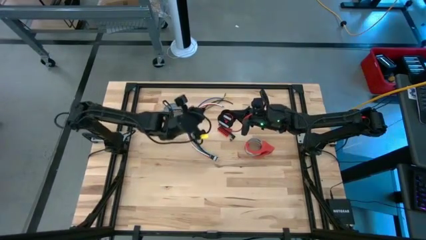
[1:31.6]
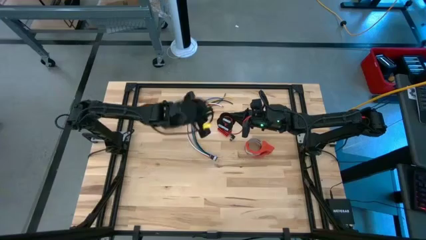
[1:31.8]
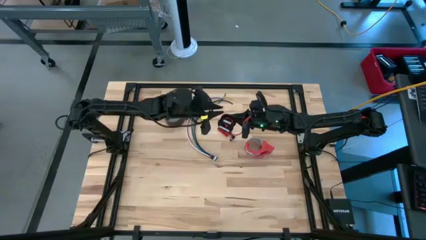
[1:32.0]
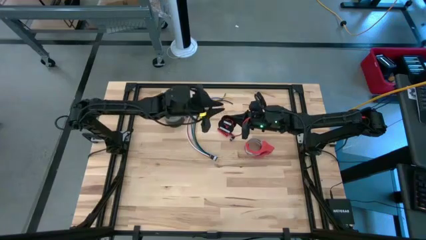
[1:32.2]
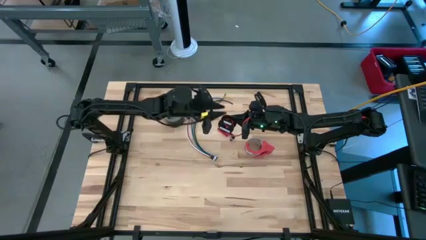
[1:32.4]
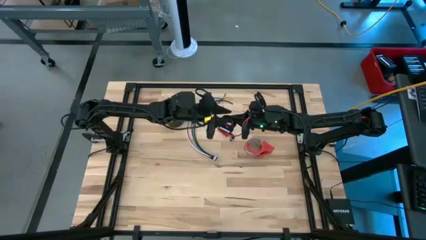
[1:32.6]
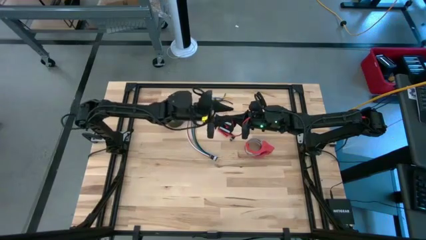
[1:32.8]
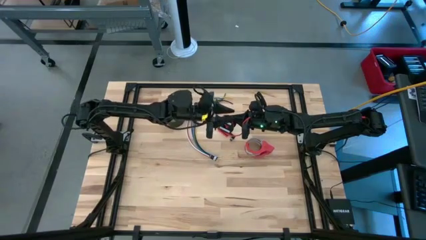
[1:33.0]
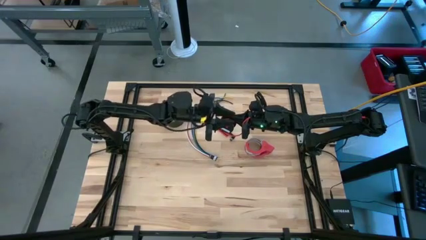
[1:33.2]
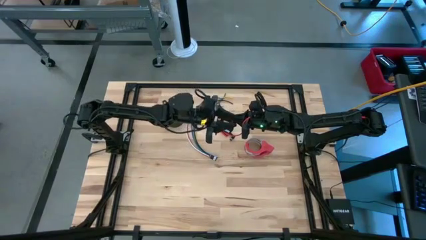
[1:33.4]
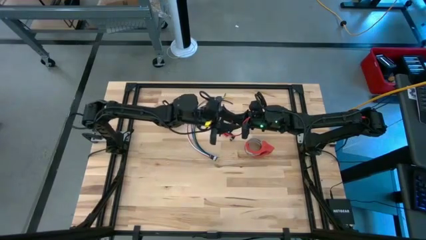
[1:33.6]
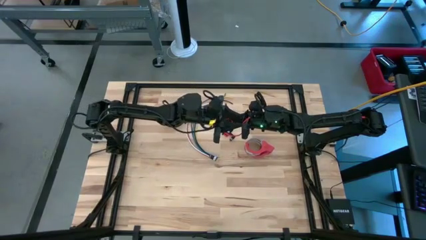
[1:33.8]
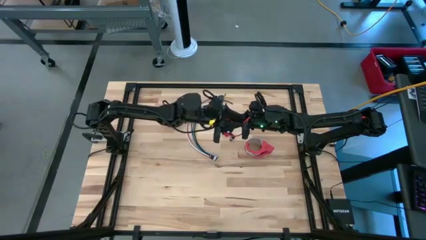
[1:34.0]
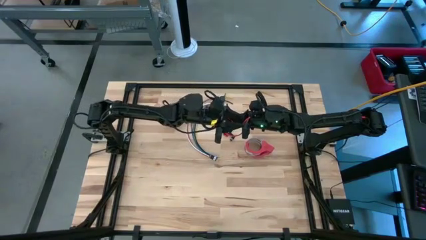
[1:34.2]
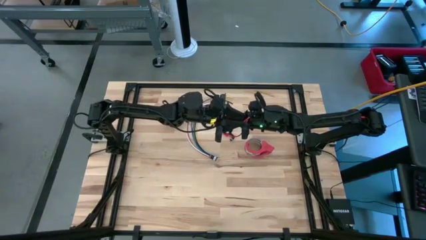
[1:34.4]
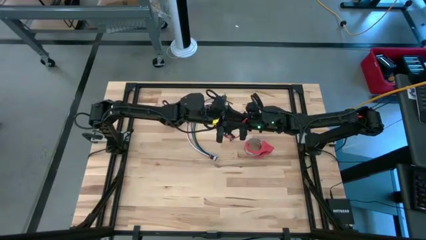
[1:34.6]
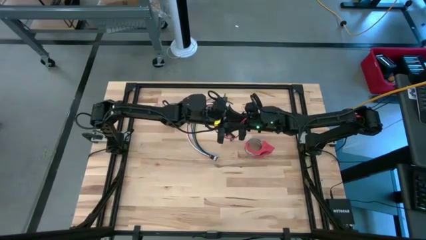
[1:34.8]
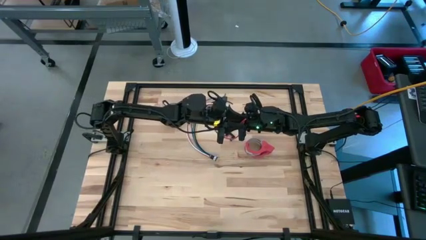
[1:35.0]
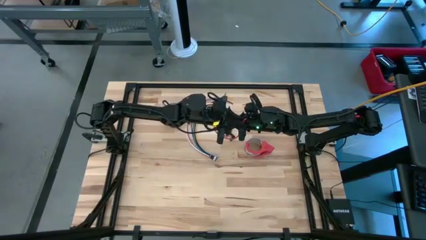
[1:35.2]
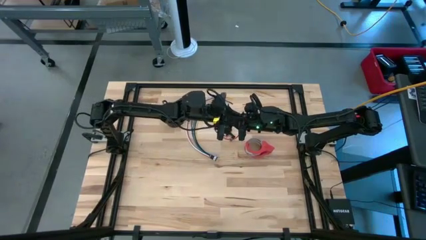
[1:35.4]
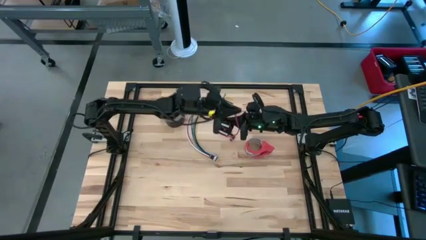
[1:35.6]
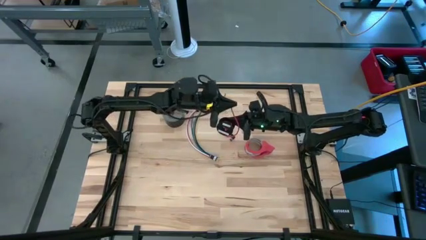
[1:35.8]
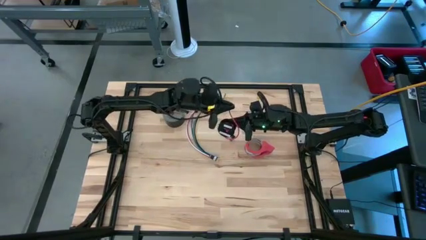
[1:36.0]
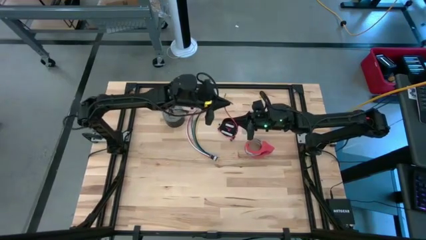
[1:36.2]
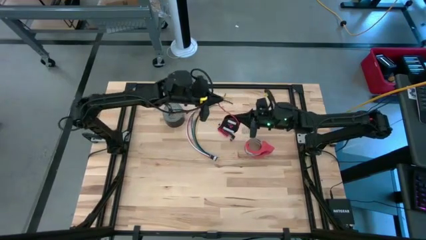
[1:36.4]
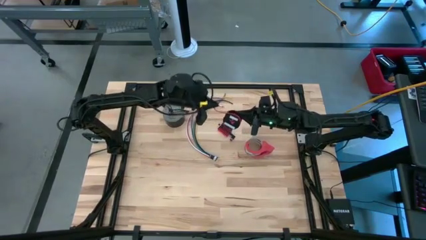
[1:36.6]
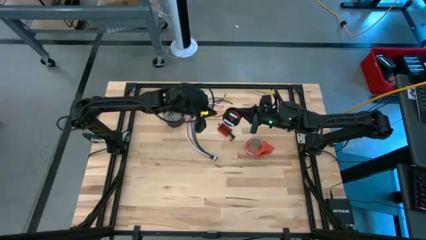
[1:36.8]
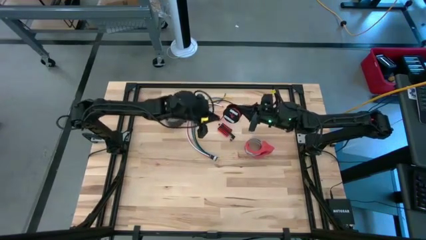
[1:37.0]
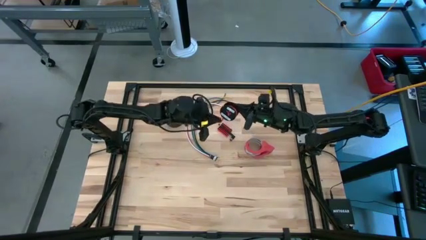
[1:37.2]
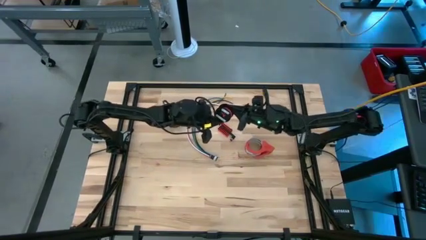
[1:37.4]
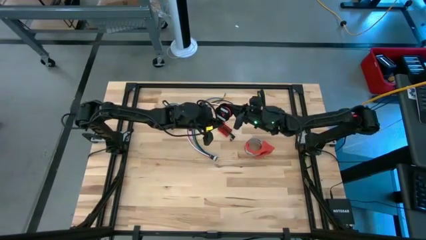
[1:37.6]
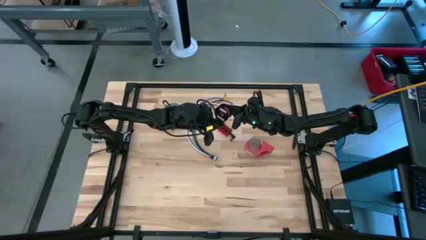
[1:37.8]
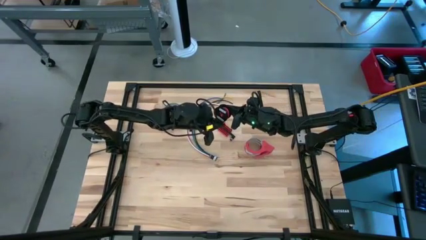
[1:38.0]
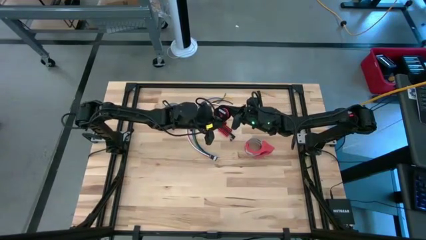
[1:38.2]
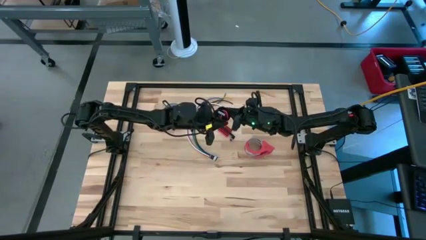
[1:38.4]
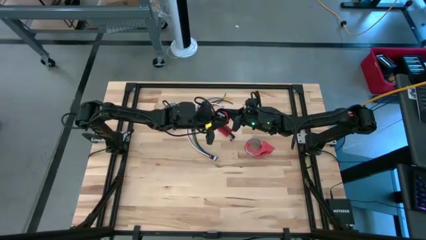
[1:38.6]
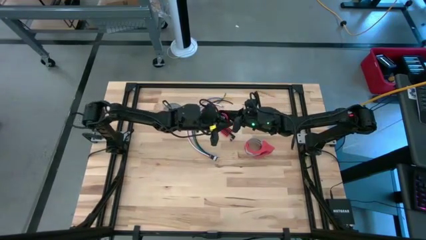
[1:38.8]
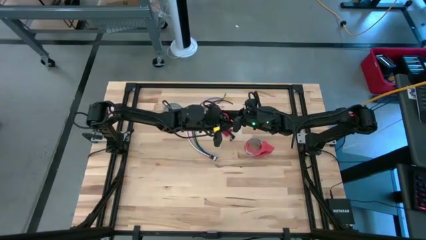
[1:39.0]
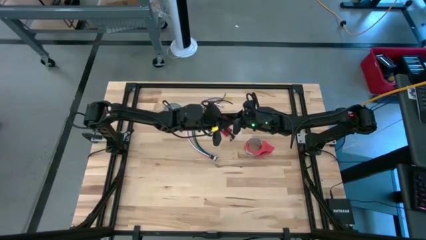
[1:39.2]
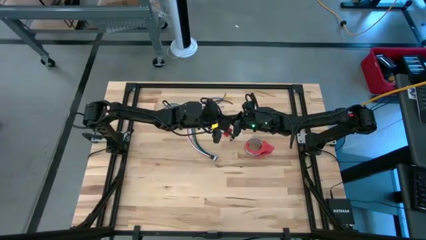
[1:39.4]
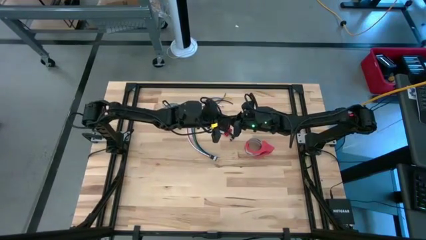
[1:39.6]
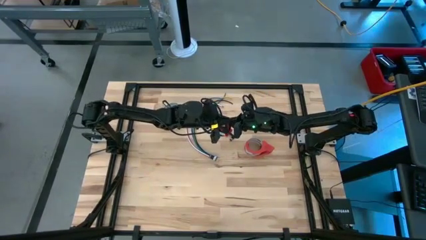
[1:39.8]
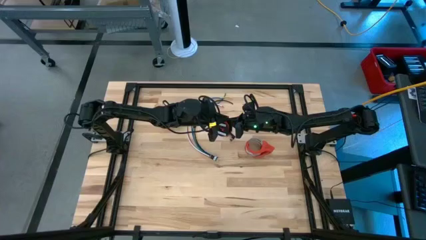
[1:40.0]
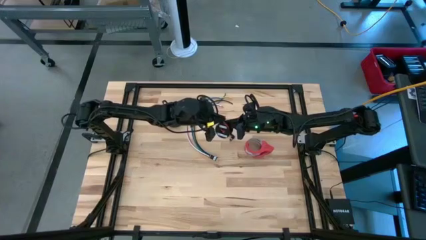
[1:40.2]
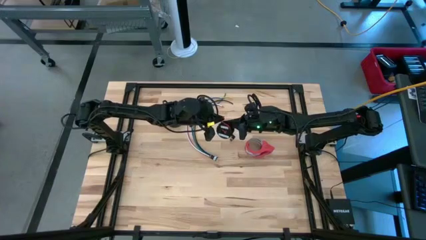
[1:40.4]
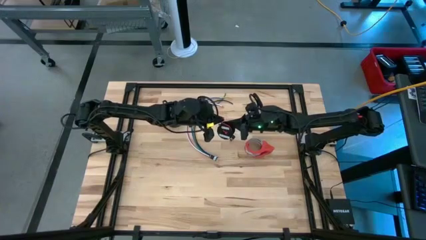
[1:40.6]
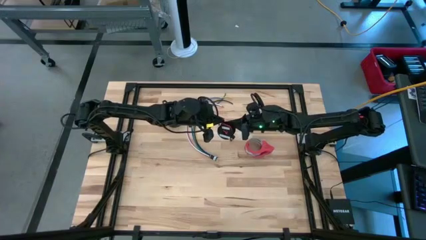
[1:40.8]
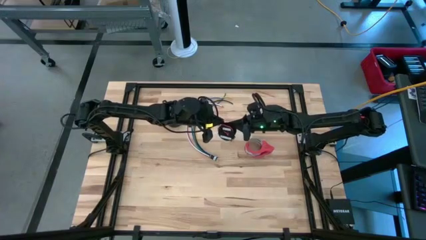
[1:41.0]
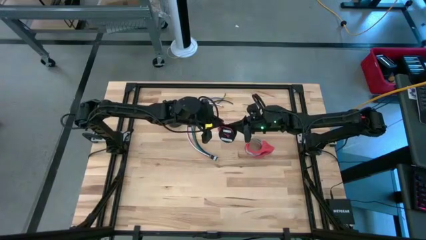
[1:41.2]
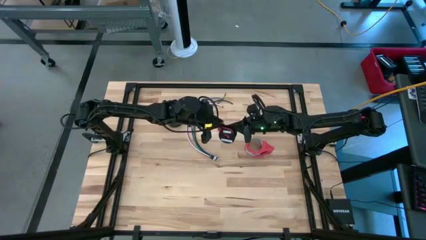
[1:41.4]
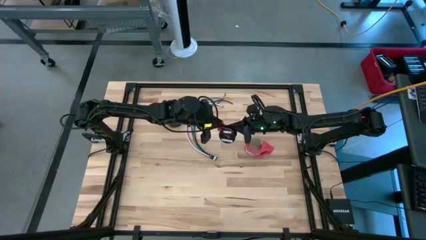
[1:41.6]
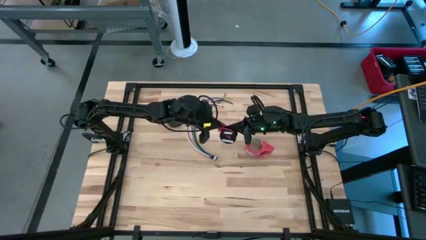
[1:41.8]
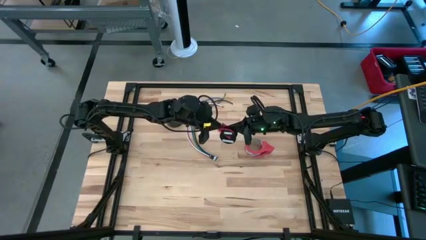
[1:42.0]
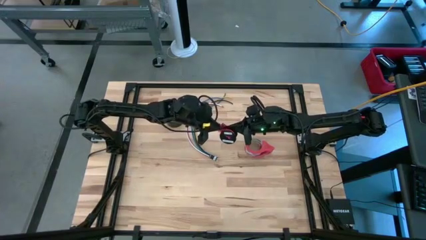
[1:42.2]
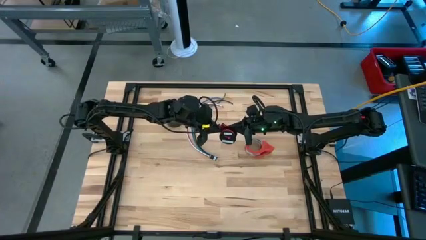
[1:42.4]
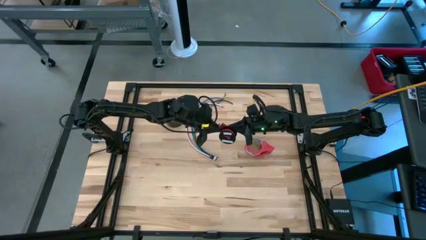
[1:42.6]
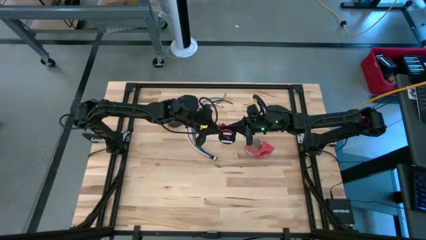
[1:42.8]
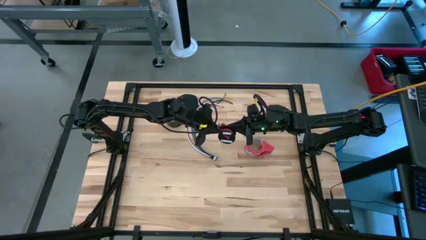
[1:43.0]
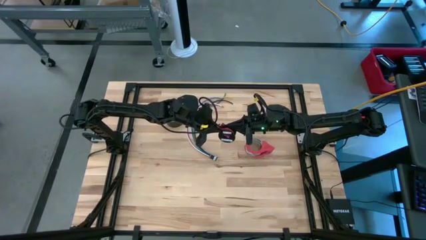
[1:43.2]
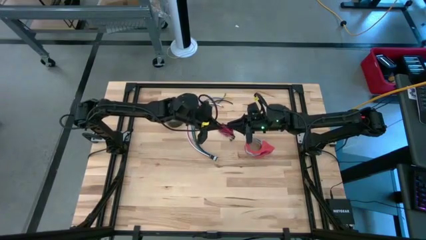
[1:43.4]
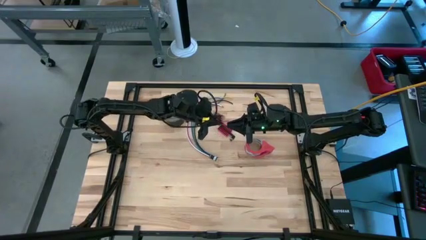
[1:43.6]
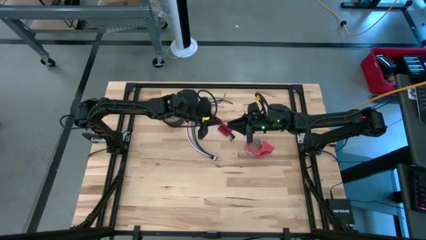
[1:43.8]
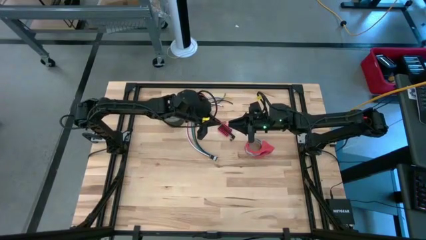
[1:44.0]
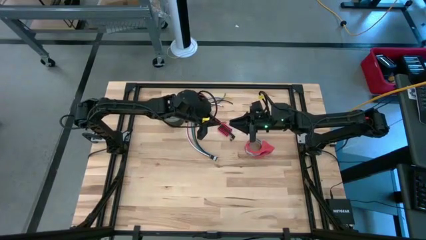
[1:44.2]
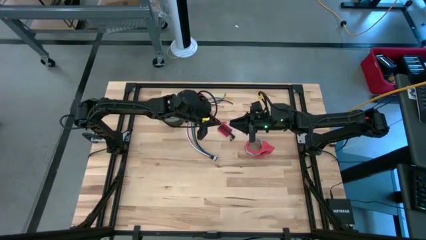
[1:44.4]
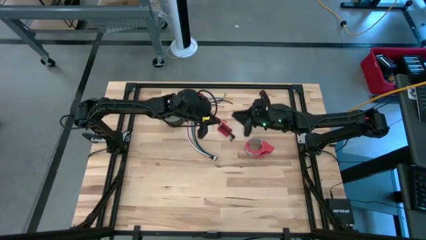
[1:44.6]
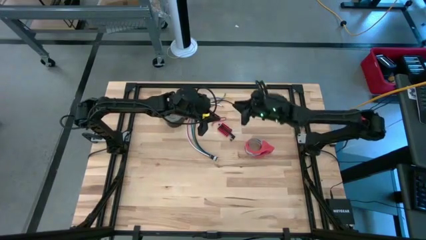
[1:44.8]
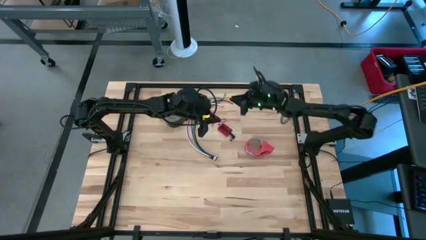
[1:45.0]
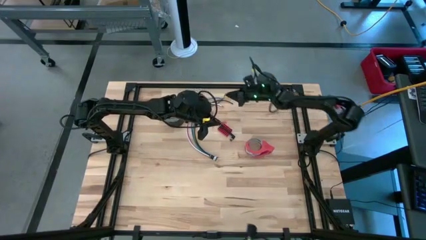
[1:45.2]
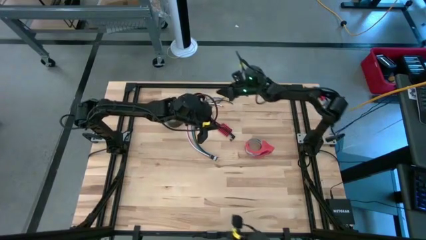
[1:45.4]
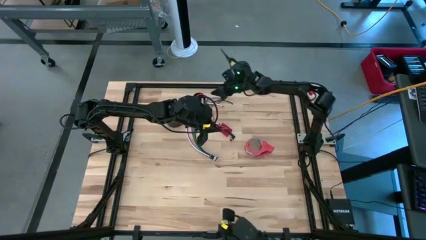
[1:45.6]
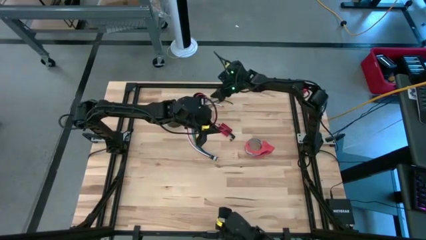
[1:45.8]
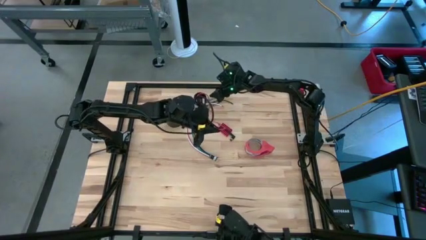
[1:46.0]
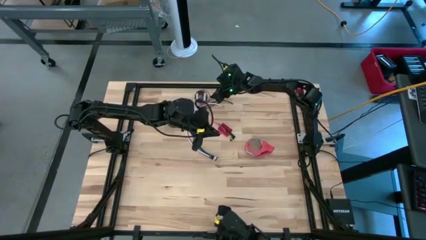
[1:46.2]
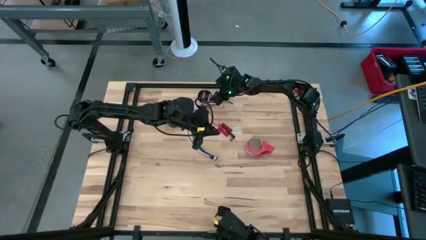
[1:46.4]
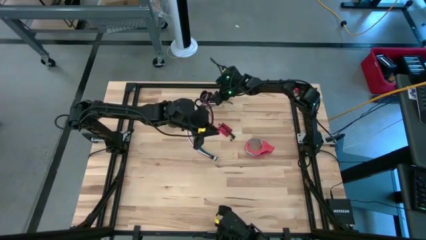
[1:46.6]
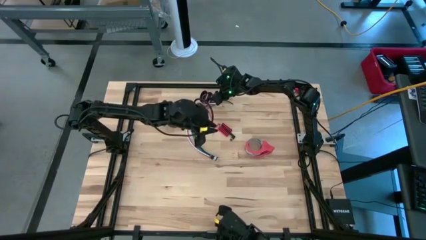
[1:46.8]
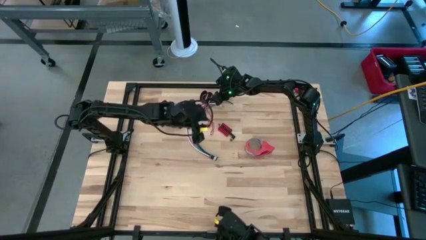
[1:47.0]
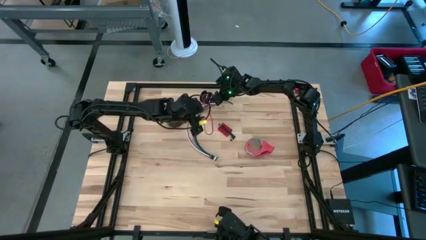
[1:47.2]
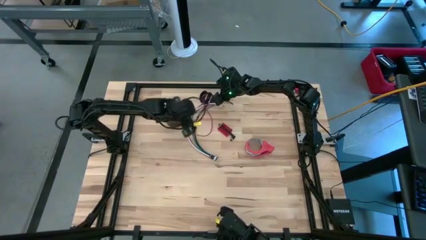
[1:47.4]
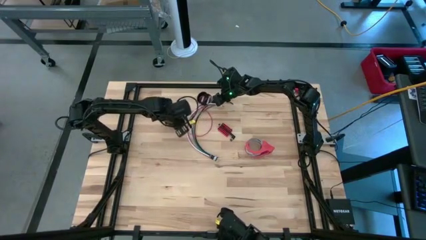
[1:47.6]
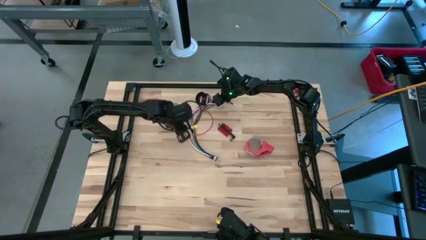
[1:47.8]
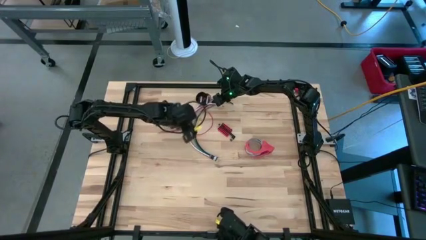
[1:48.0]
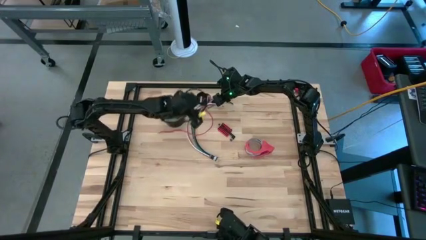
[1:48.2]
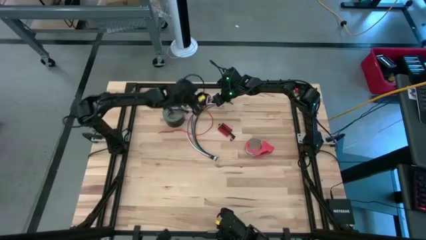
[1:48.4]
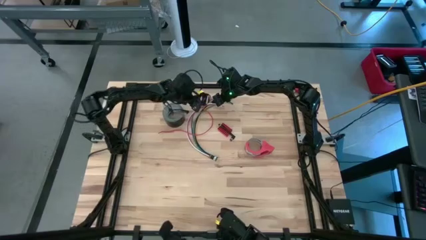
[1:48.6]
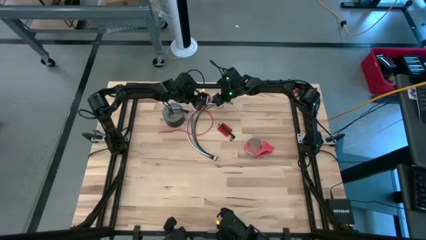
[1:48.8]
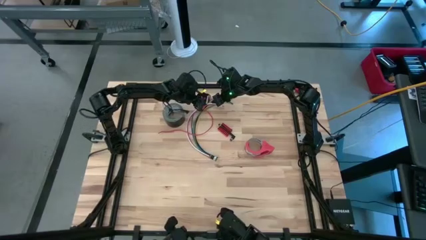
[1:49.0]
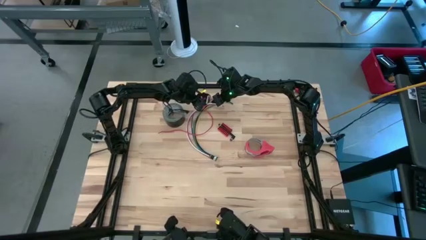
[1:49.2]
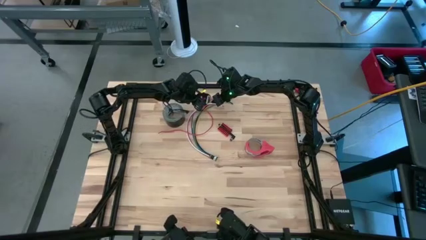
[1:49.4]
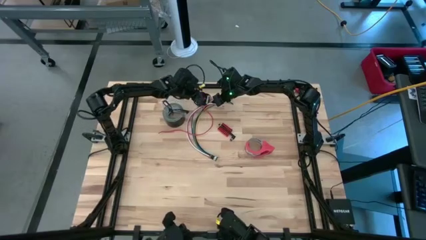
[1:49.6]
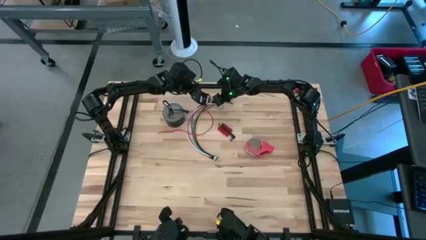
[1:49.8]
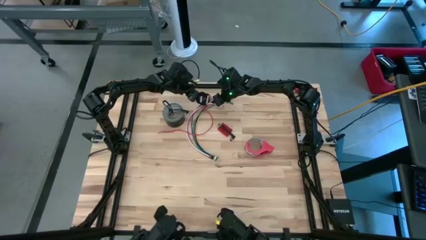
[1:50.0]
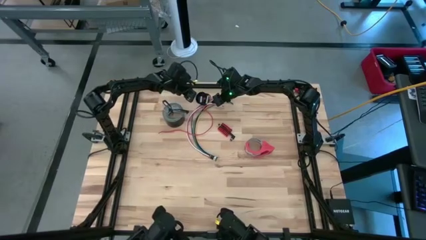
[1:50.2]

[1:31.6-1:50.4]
Task: Coil cords
Coil the red wire onto the spool
